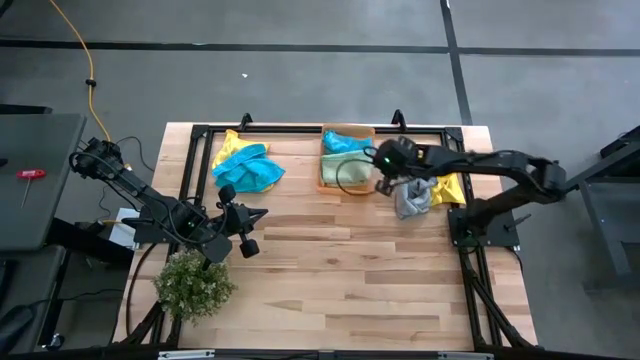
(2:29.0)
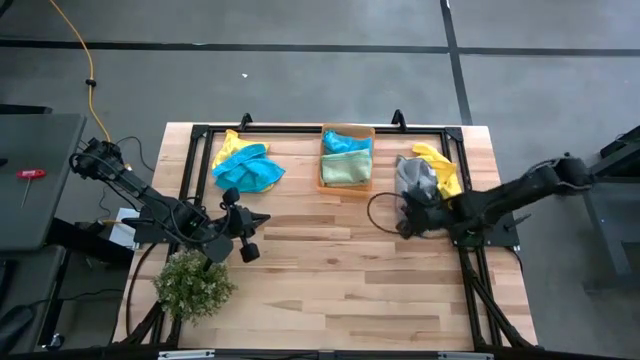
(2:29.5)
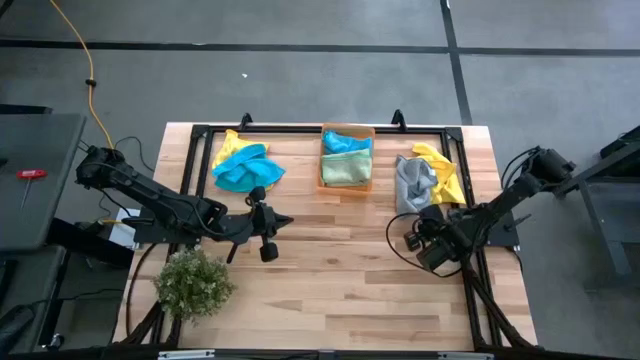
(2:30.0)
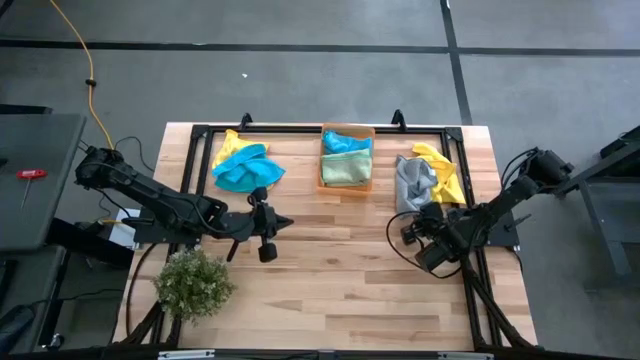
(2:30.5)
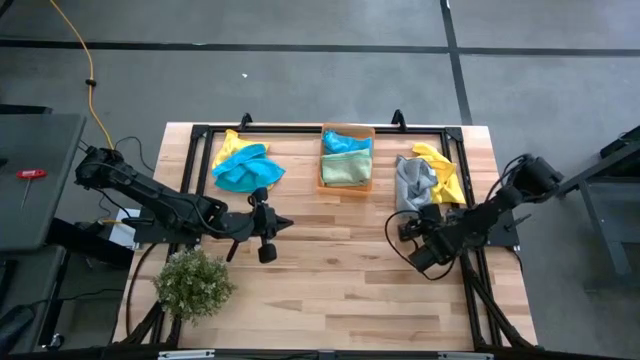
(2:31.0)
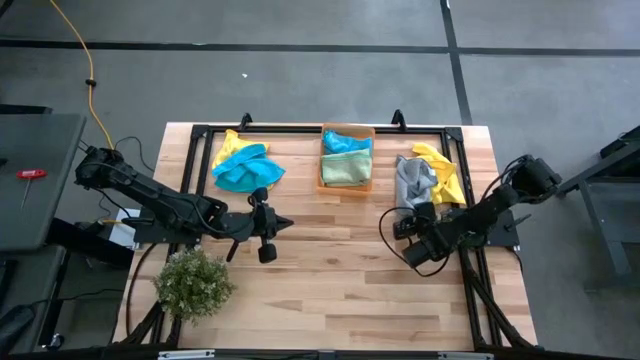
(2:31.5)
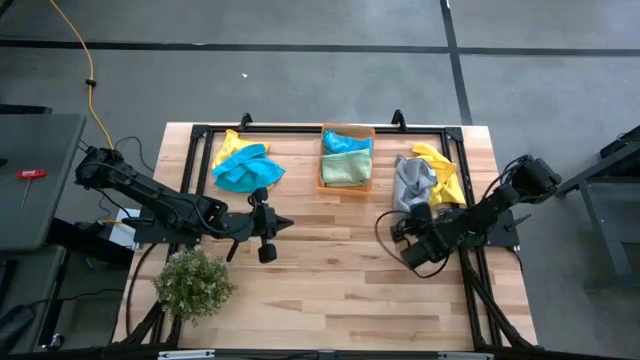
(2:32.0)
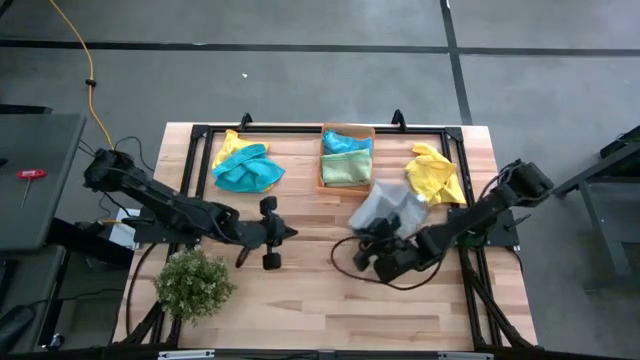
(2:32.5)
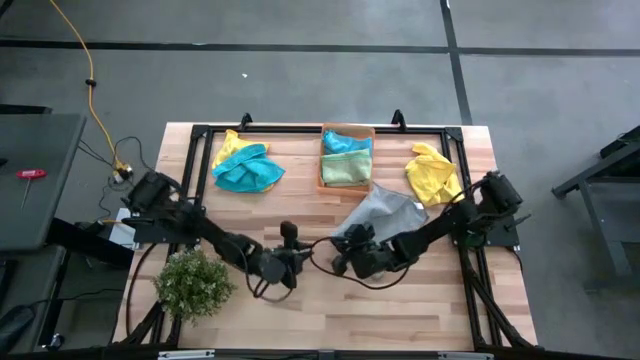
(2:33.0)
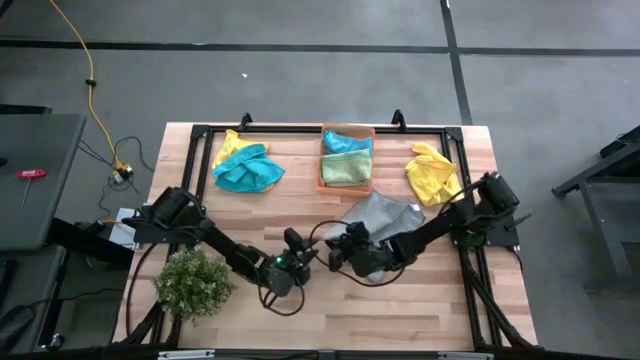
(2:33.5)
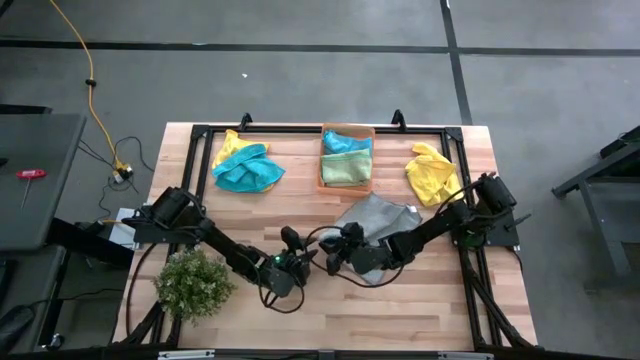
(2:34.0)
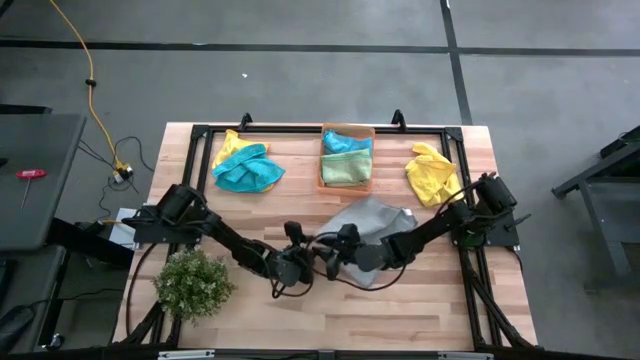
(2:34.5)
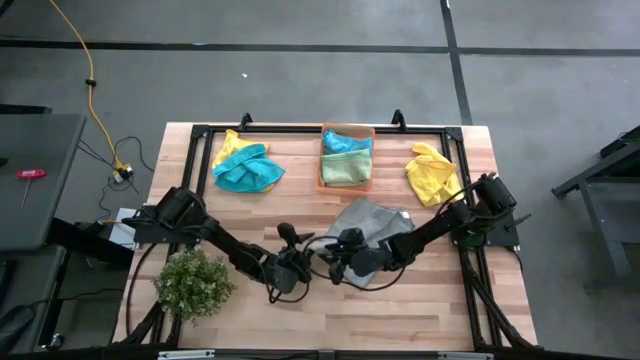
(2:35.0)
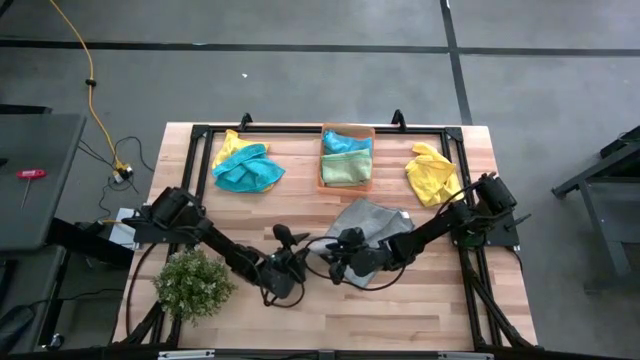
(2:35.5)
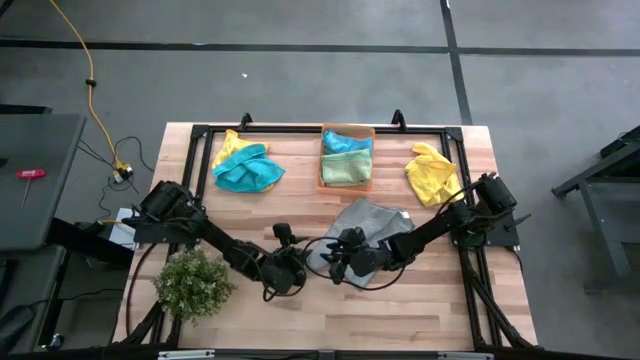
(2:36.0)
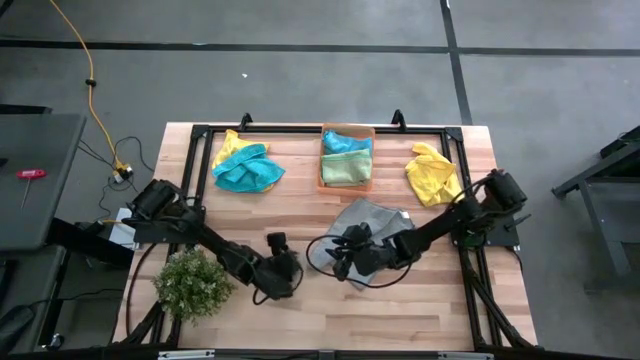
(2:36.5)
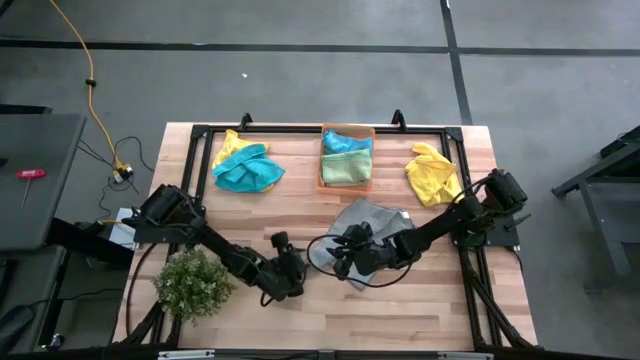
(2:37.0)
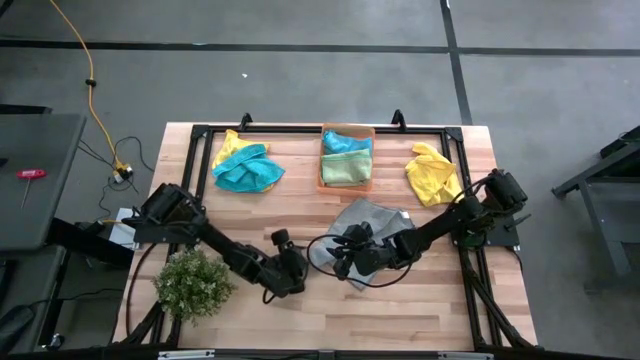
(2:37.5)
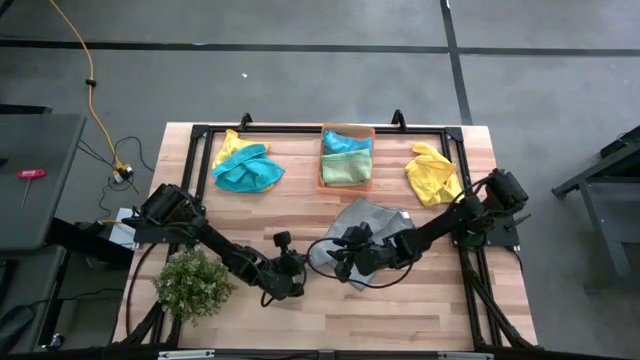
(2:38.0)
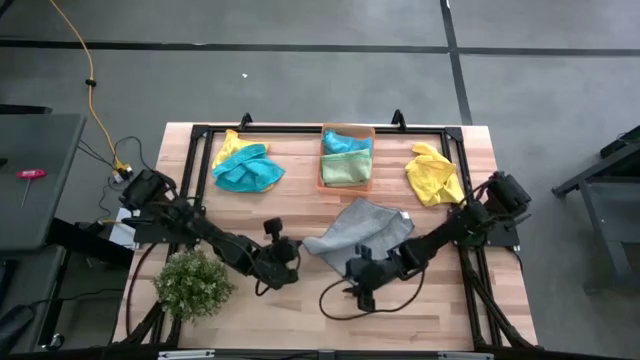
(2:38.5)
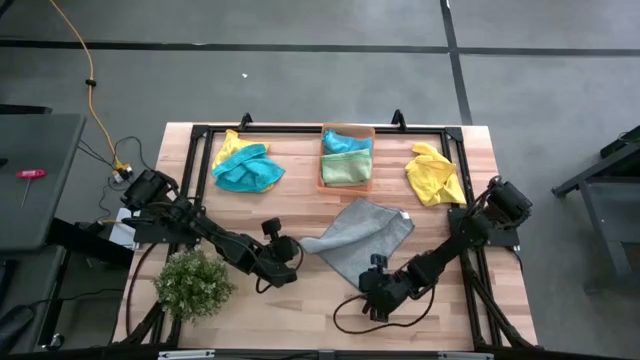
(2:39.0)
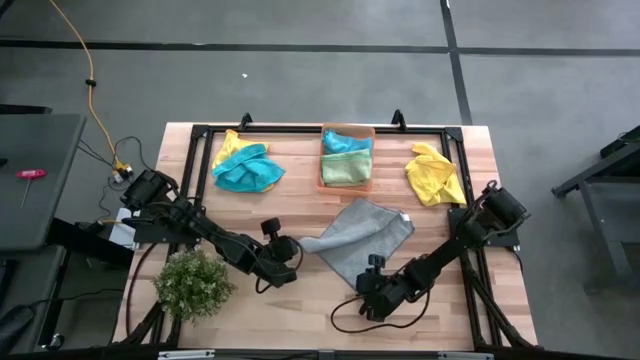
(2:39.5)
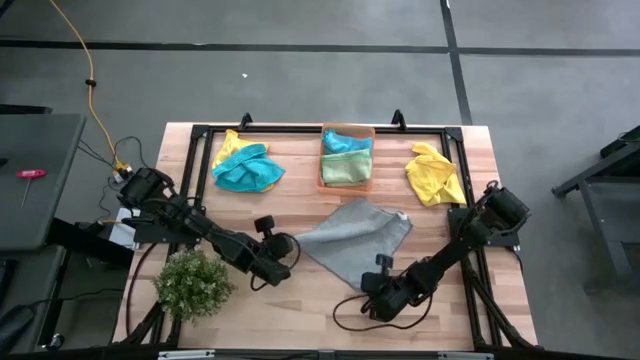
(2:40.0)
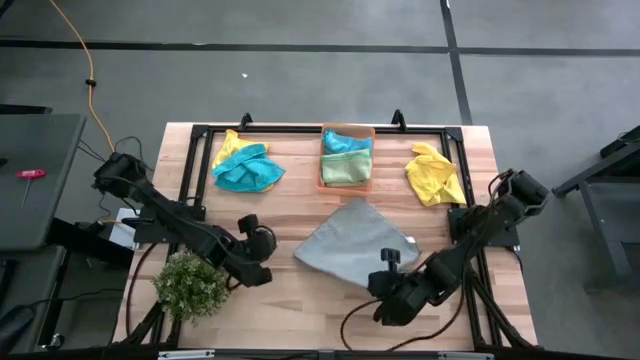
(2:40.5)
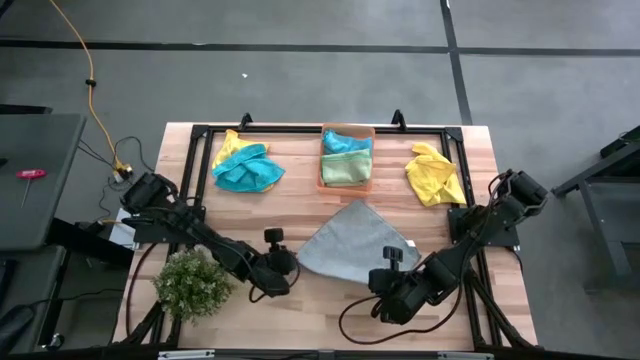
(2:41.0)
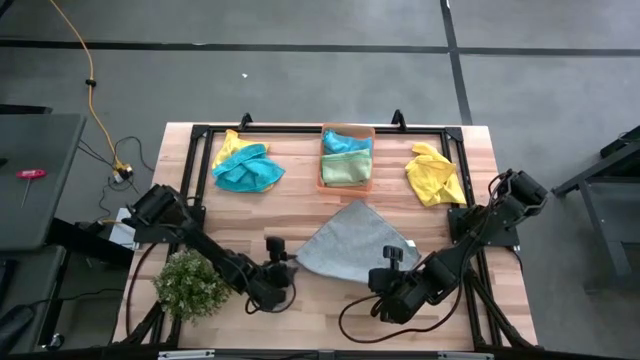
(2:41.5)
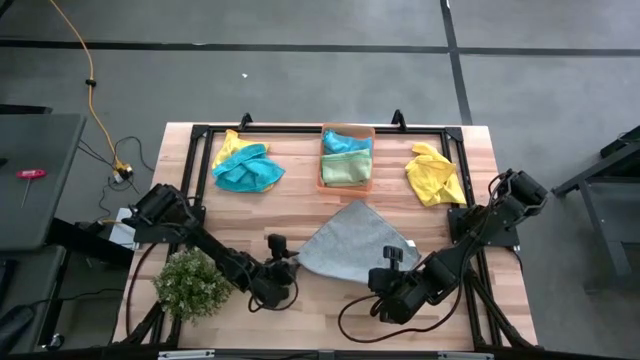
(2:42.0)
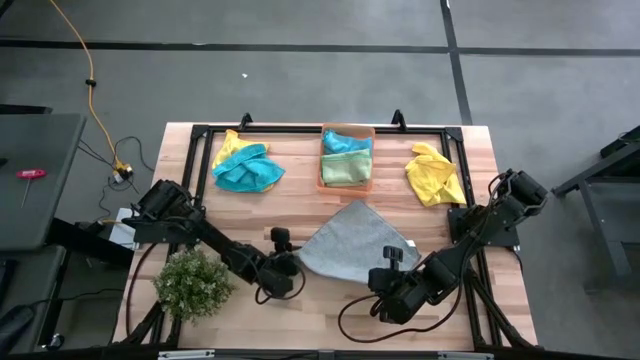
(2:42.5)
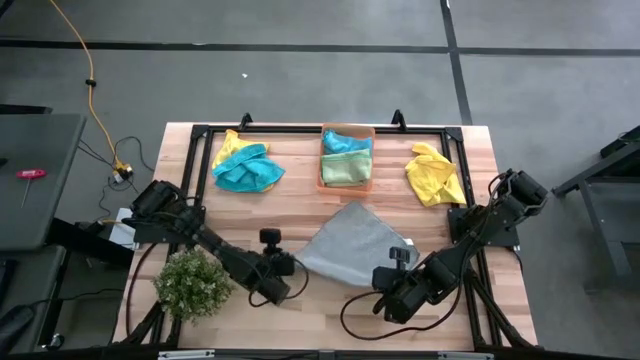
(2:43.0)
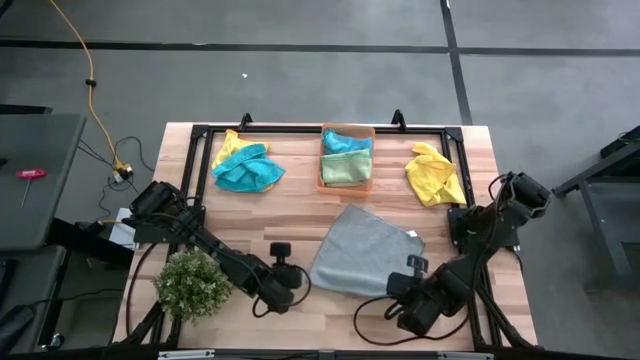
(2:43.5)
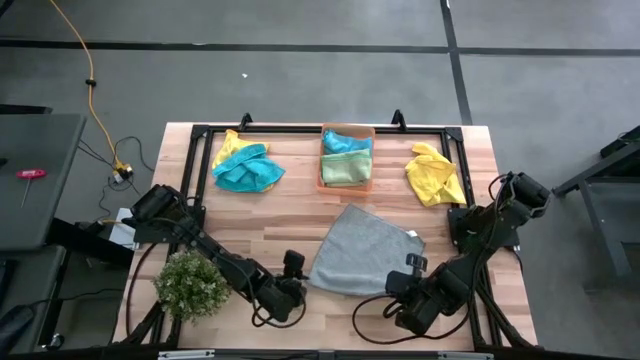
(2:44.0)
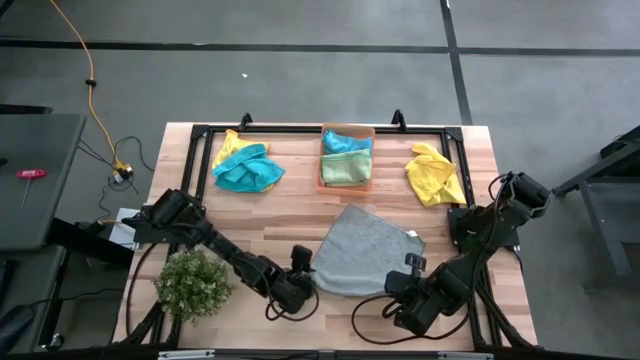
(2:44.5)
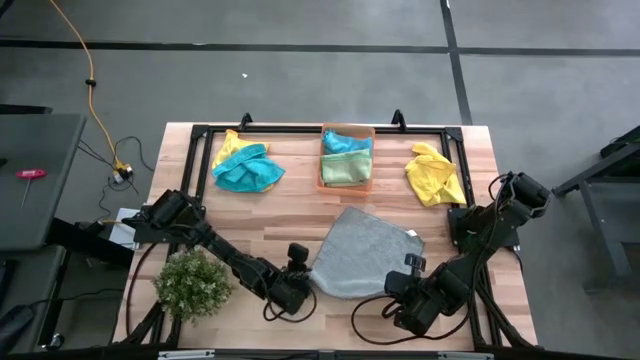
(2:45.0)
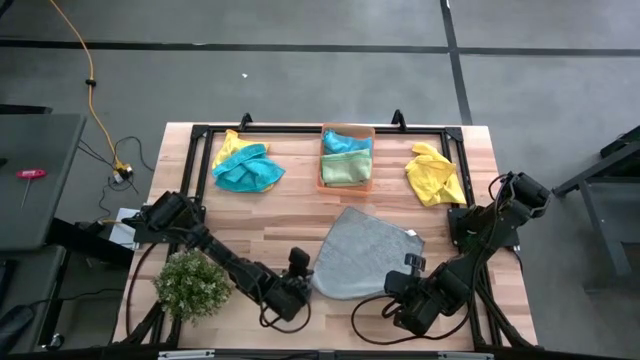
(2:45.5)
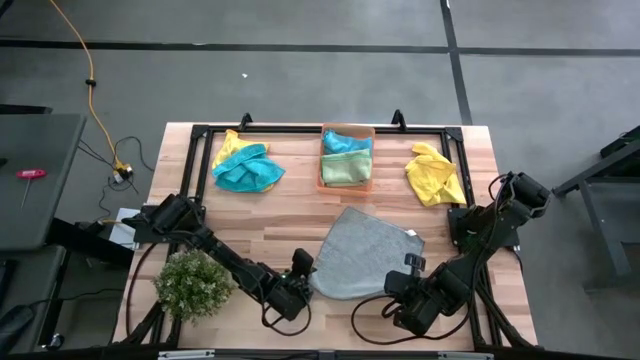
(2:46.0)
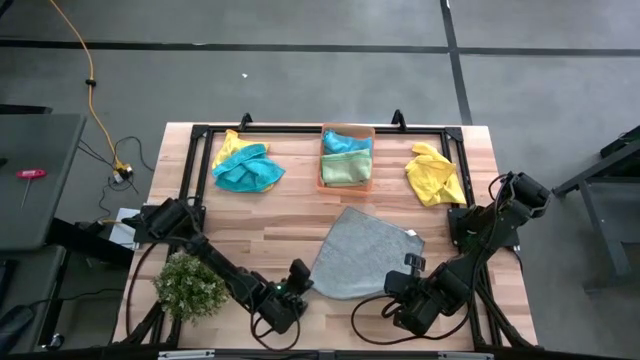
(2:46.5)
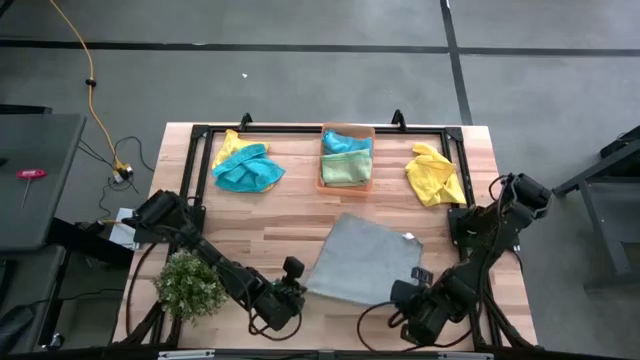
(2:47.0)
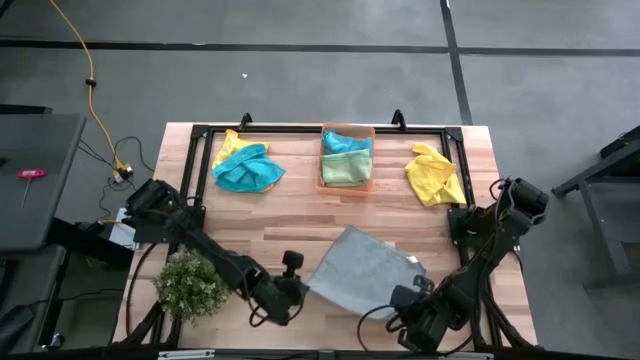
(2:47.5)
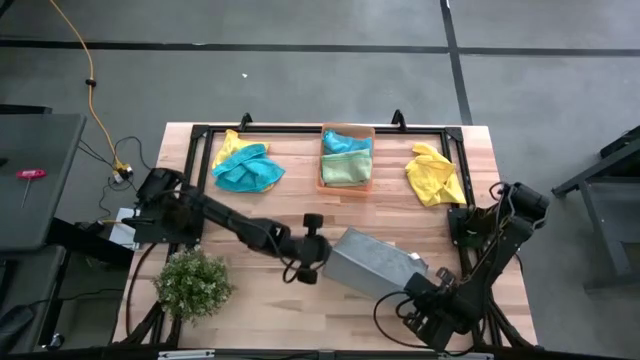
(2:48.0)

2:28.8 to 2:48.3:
Task: Fold microfiber towels
Fold the gray microfiber cloth
